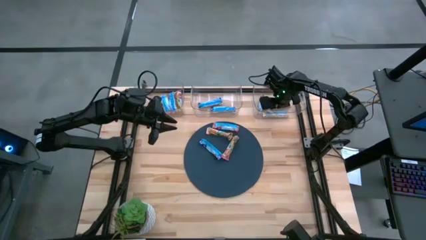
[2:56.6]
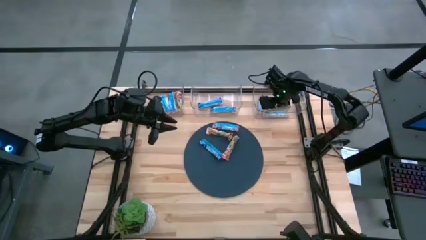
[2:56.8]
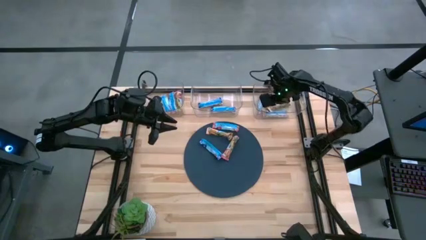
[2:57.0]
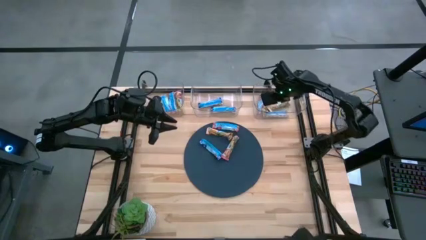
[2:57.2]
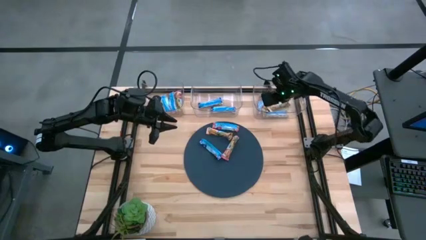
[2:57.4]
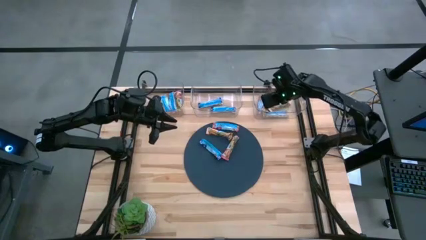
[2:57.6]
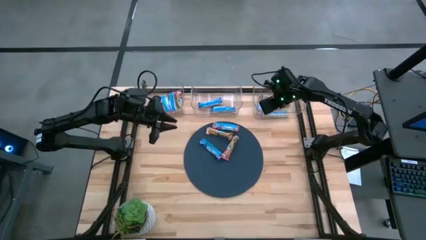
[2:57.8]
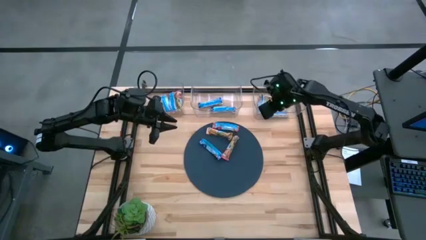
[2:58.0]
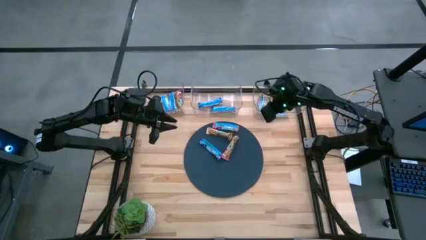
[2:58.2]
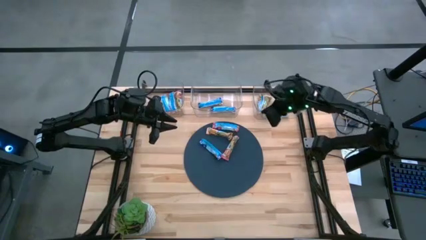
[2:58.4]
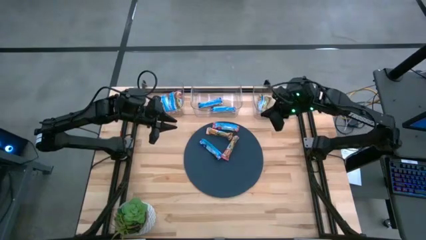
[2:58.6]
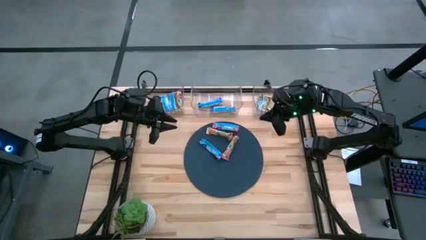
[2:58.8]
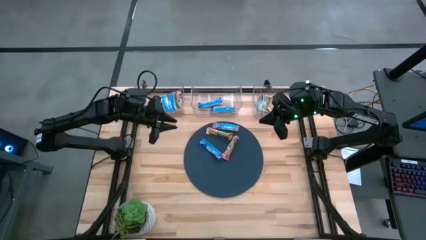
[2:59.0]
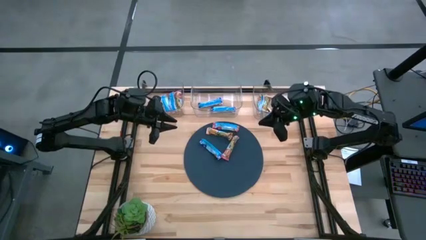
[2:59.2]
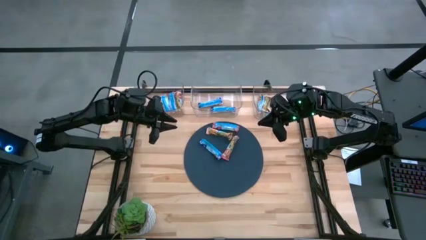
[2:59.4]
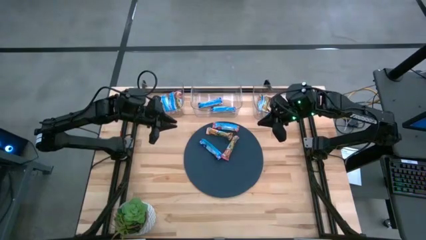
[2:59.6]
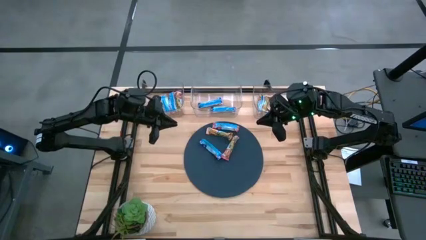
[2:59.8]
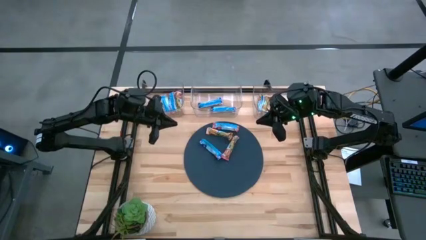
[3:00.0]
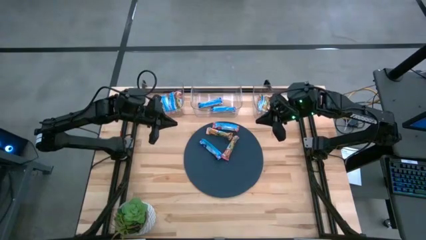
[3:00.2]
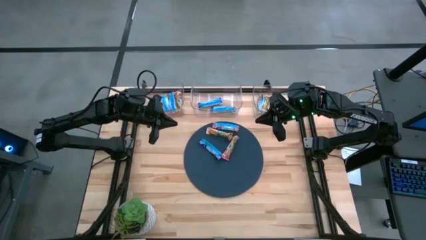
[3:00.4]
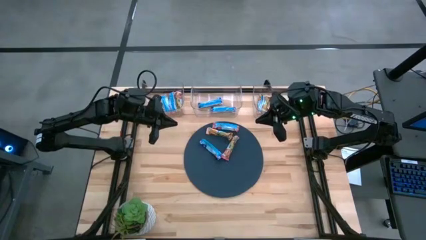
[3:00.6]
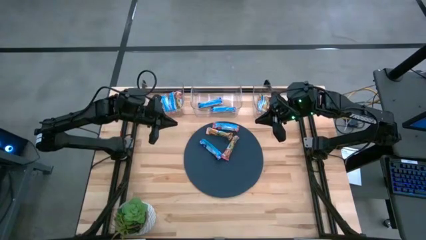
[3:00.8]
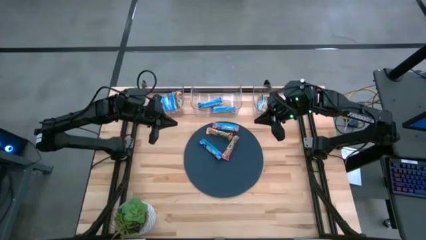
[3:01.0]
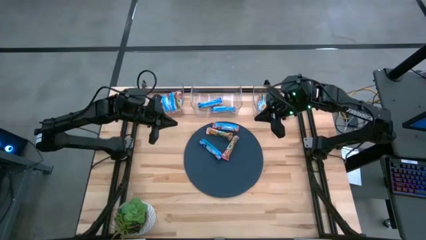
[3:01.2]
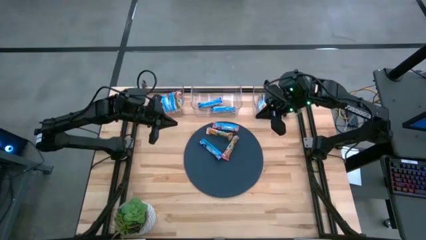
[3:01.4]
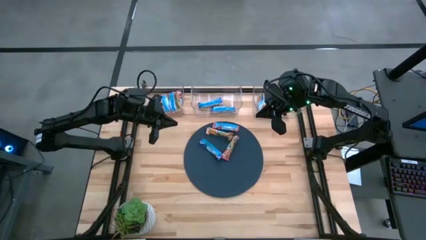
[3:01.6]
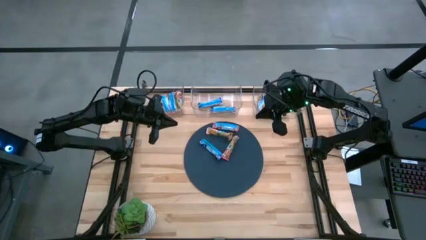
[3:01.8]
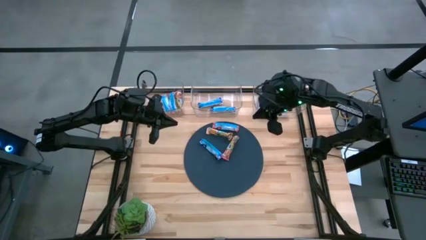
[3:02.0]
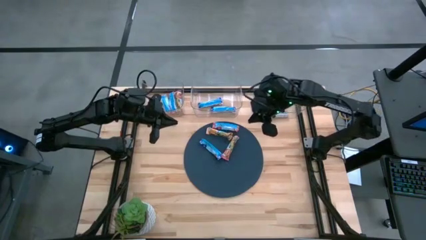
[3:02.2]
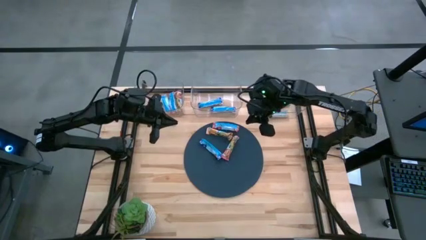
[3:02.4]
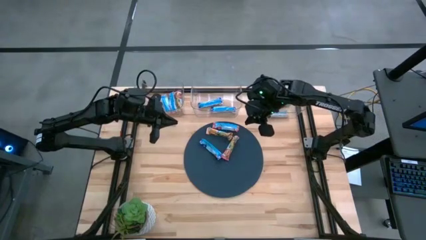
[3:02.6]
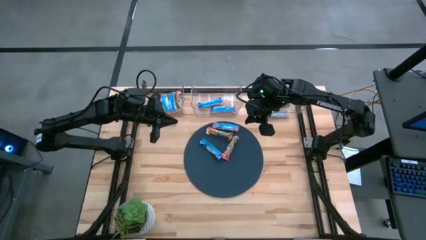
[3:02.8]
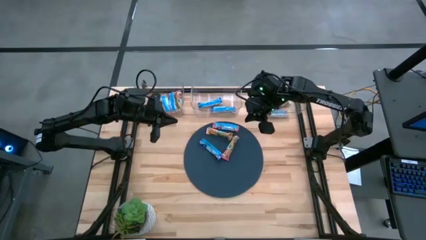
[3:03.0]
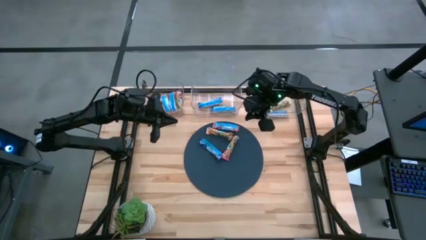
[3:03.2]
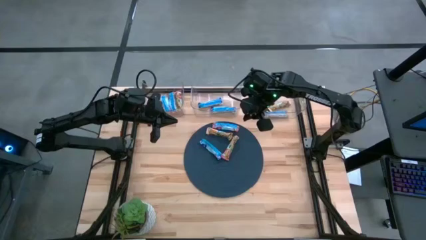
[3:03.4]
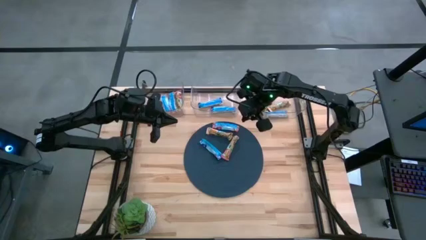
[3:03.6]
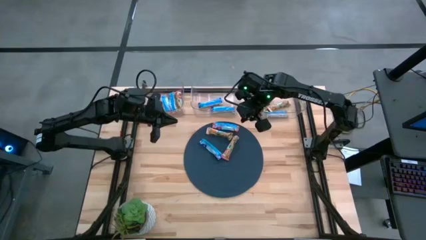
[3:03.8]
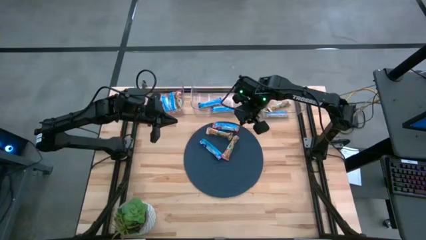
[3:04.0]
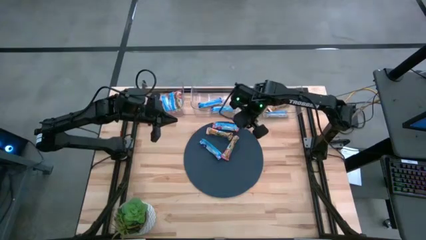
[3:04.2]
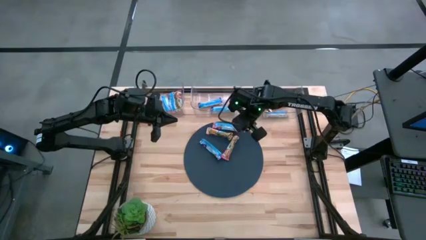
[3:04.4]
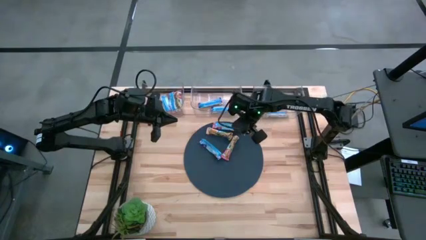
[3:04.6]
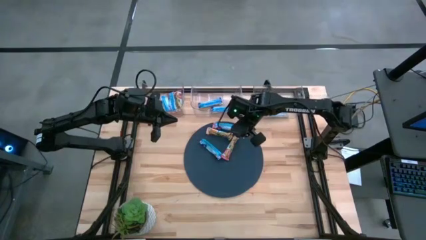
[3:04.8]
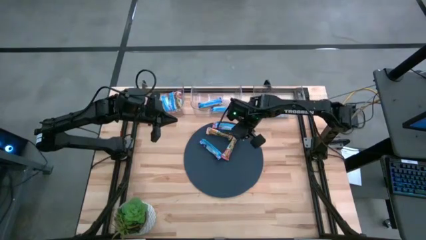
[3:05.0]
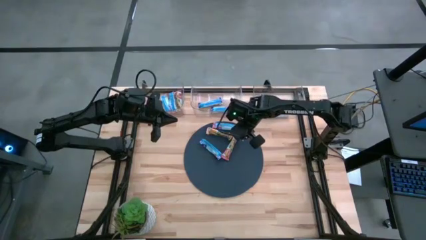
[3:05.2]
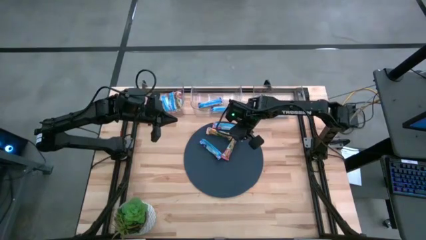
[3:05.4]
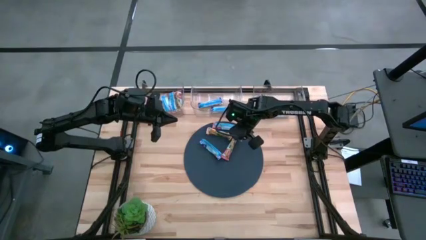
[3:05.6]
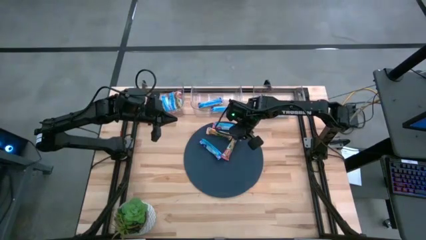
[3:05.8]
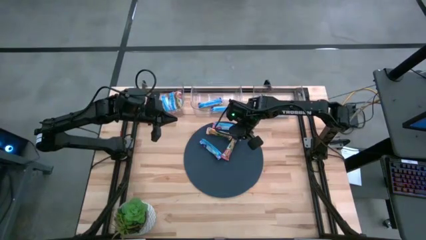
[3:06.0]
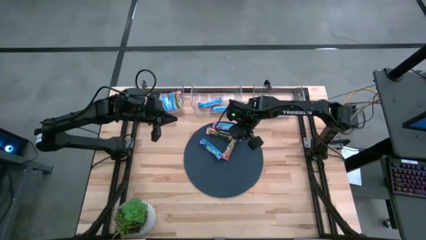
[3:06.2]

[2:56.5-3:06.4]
Task: Pick and place Granola Bars by type
Put the yellow granola bar into the right transparent bin

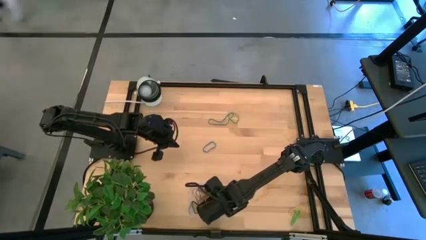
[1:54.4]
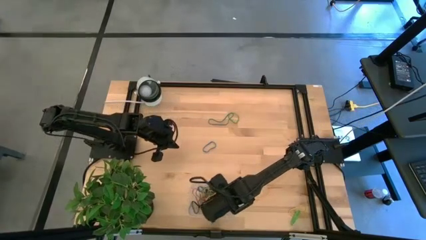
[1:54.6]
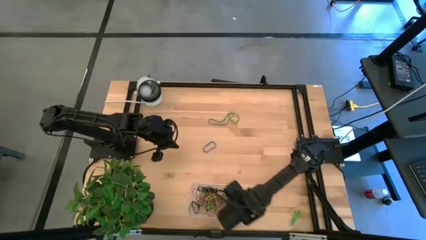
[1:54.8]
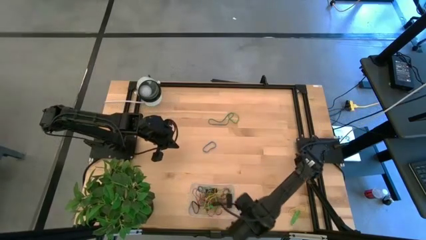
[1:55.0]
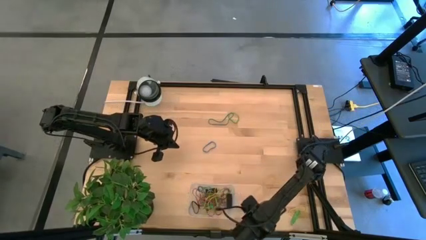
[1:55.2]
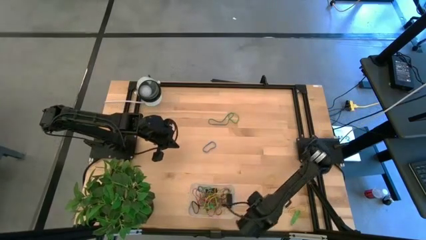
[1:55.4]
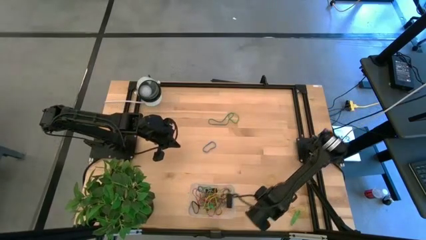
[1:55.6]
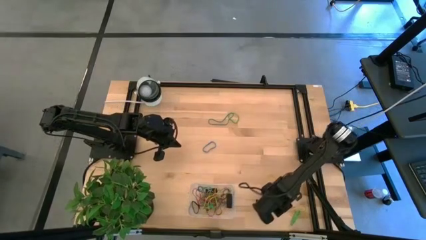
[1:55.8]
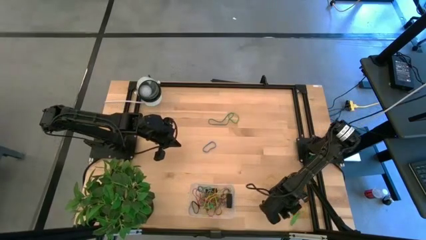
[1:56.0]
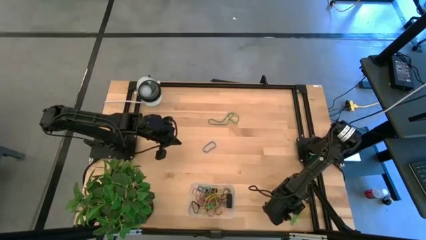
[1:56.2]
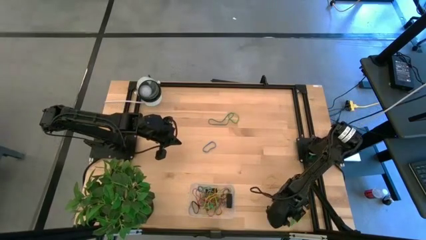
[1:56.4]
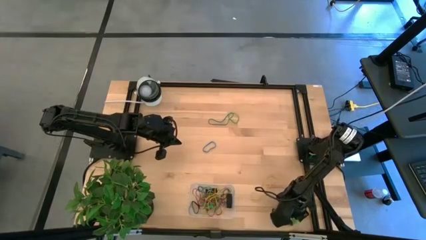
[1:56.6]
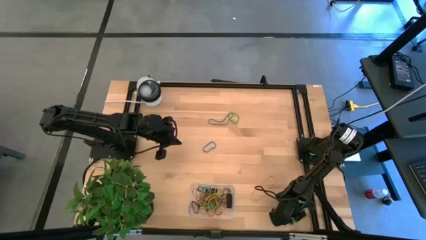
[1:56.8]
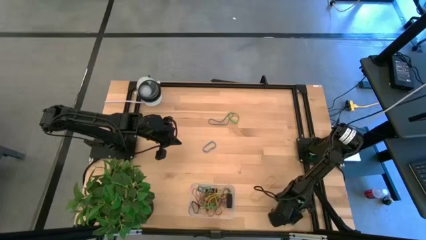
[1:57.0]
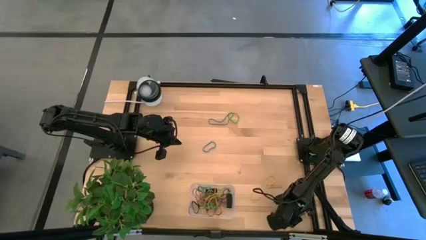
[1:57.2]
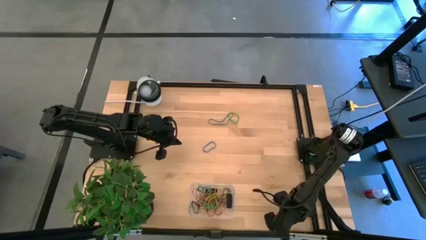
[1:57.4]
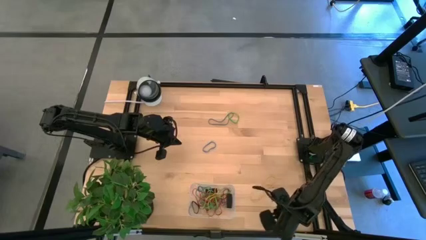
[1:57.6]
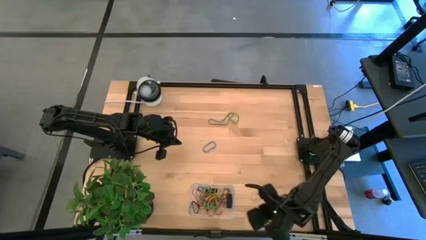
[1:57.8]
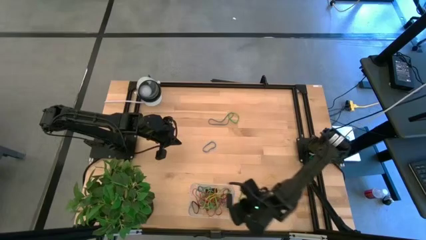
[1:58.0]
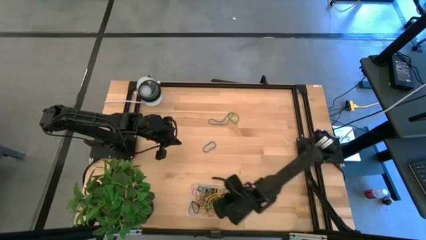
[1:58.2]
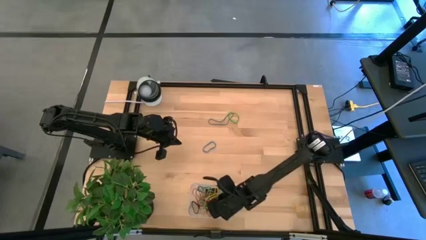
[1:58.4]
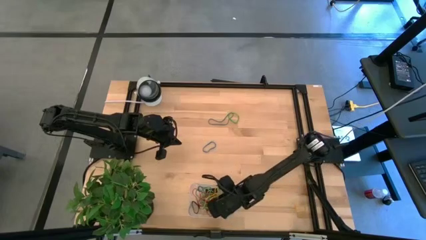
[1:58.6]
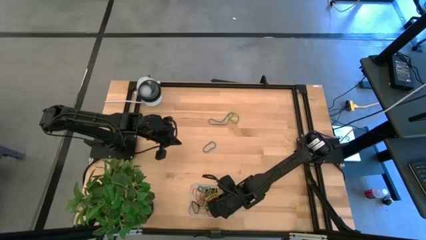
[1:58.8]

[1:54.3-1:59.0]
Task: Pick and place rubber bands into bin
Put the green rubber band into the transparent bin

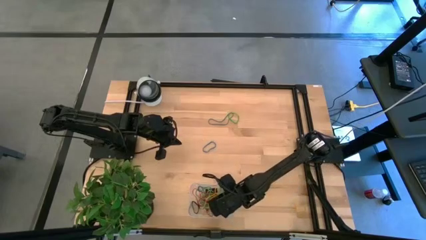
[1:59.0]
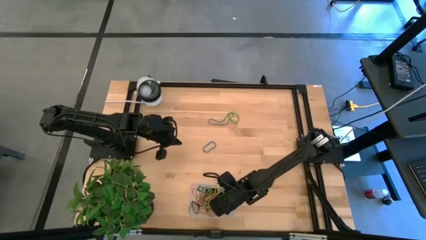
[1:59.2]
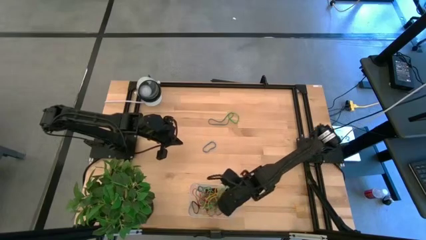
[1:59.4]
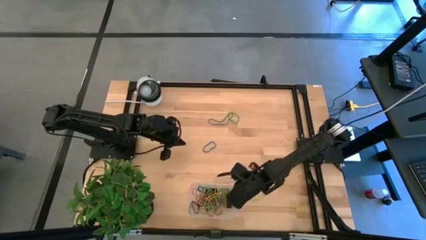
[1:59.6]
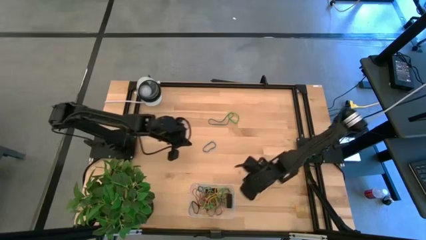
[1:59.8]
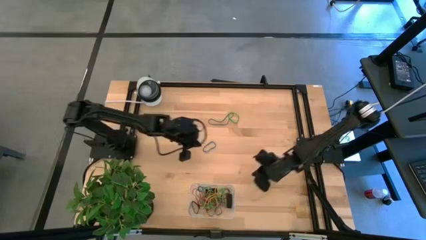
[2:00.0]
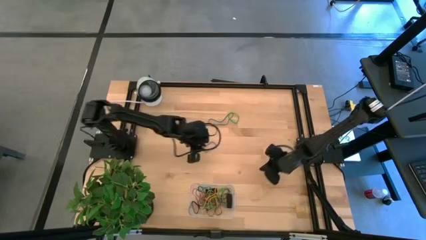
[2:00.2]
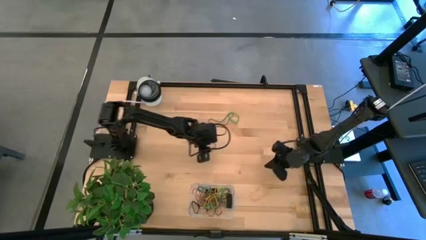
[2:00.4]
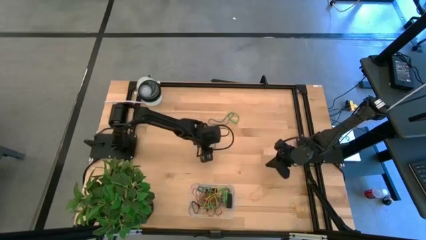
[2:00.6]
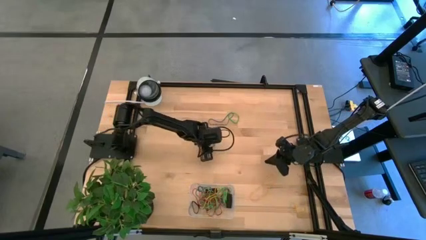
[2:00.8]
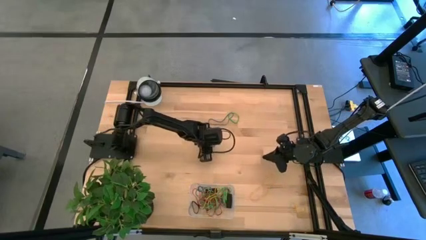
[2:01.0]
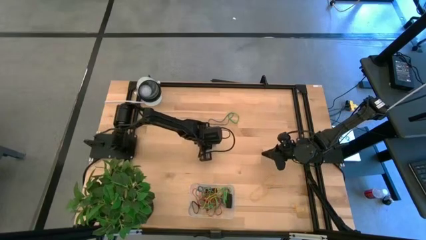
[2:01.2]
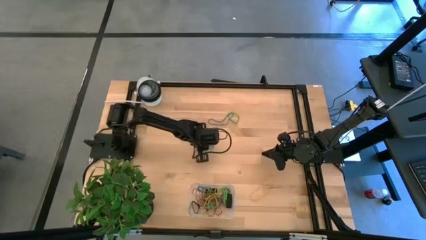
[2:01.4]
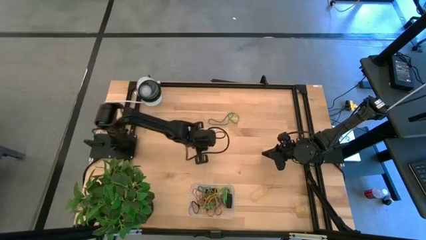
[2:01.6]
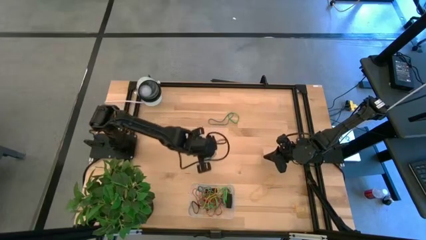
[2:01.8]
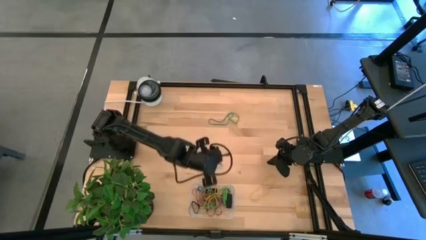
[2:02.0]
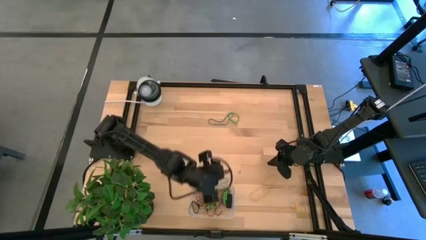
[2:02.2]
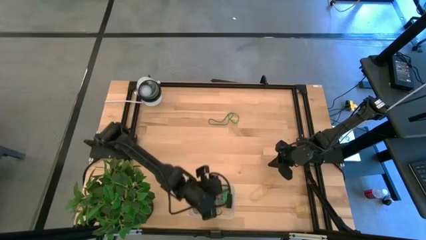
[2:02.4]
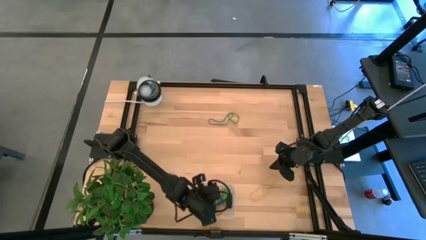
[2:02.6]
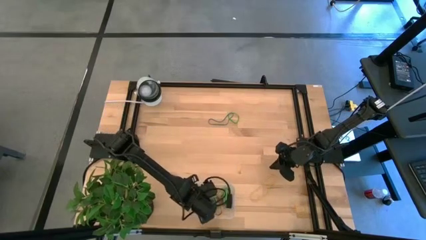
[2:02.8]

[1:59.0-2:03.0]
Put the blue rubber band into the transparent bin
